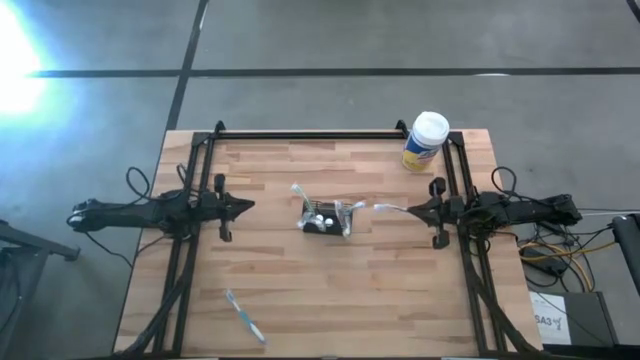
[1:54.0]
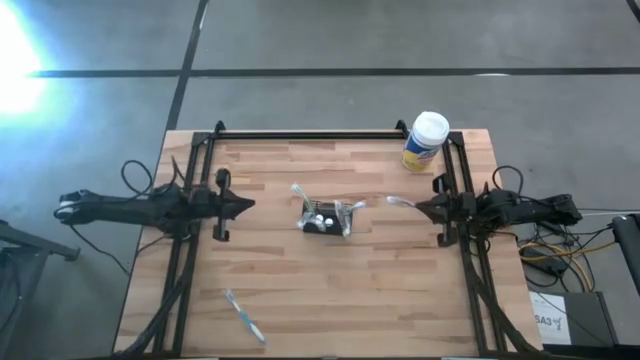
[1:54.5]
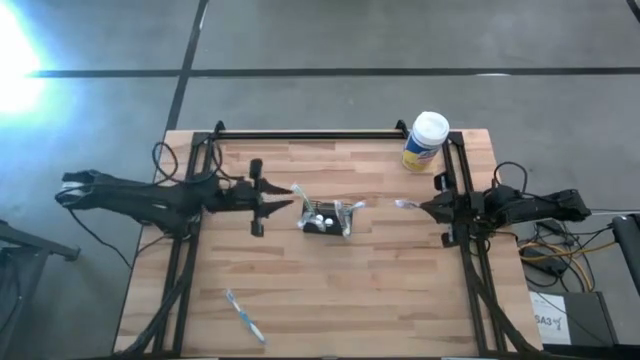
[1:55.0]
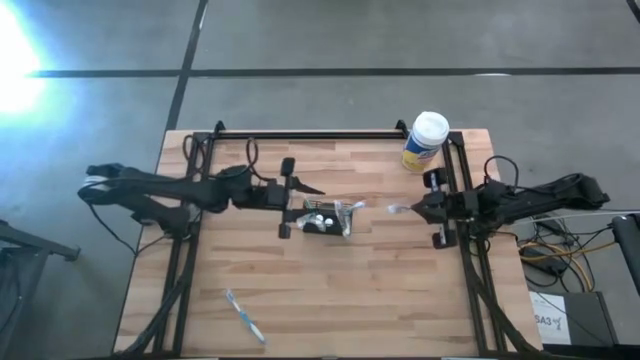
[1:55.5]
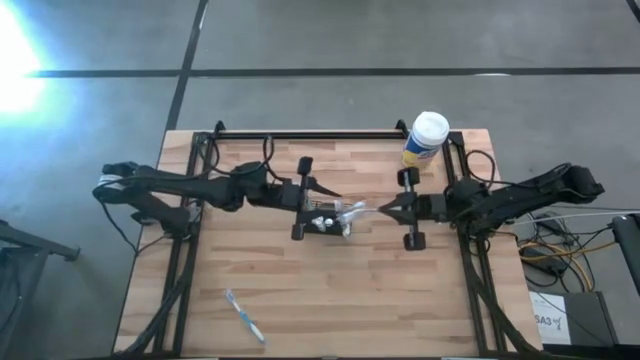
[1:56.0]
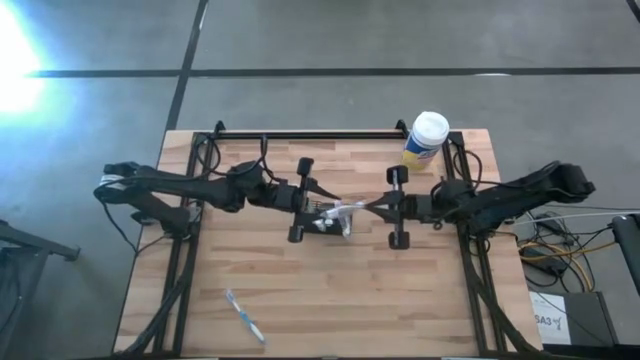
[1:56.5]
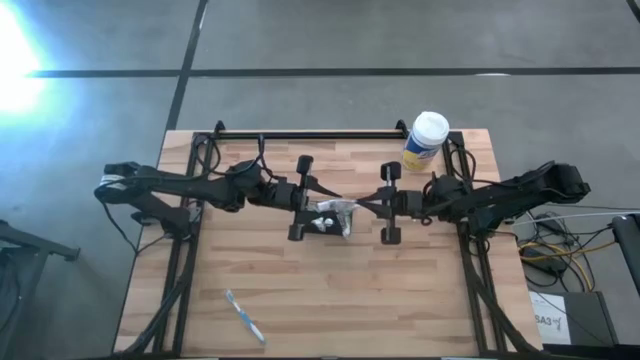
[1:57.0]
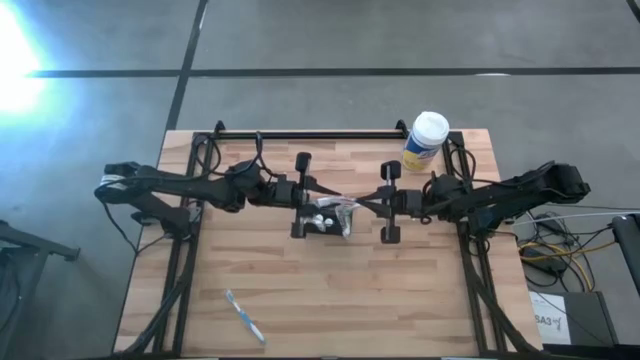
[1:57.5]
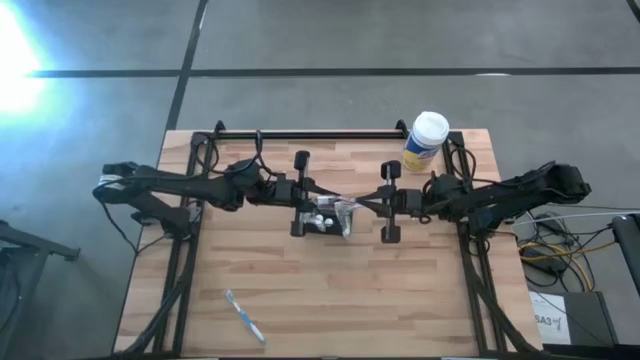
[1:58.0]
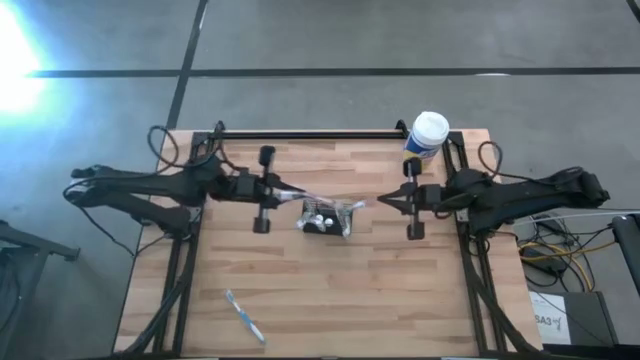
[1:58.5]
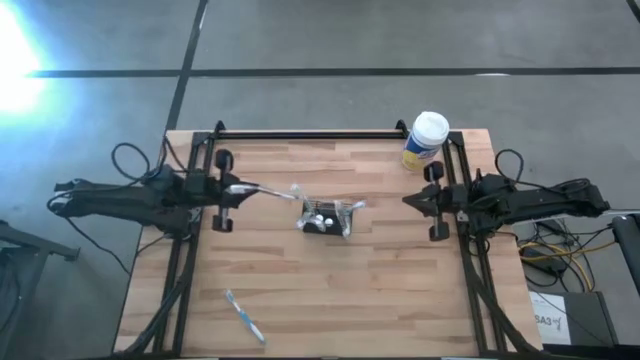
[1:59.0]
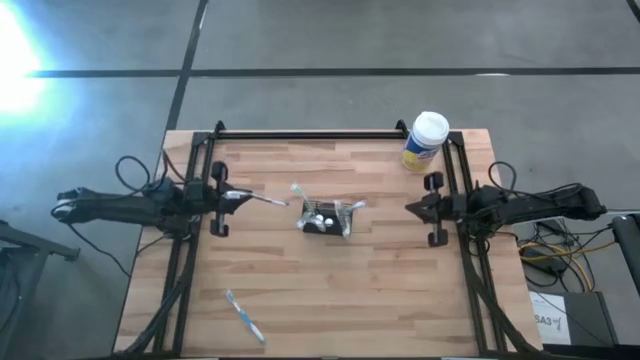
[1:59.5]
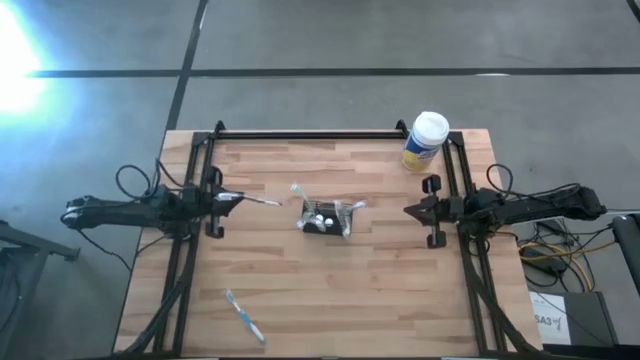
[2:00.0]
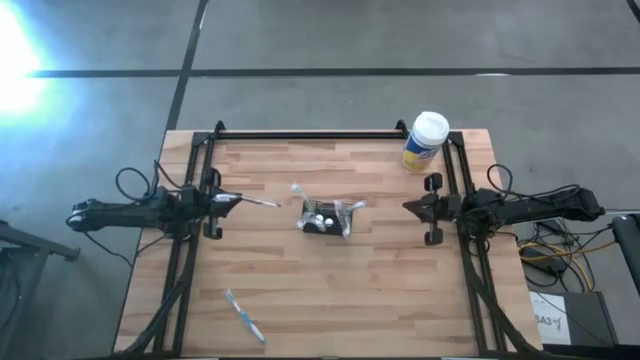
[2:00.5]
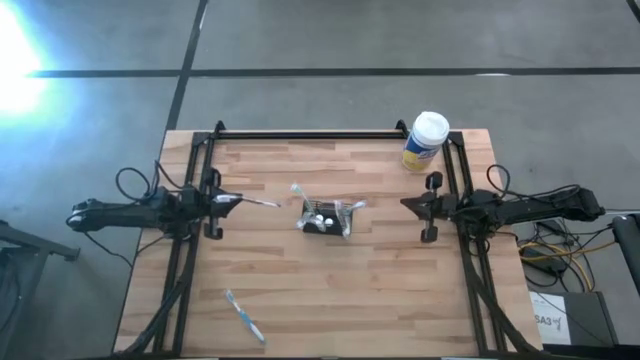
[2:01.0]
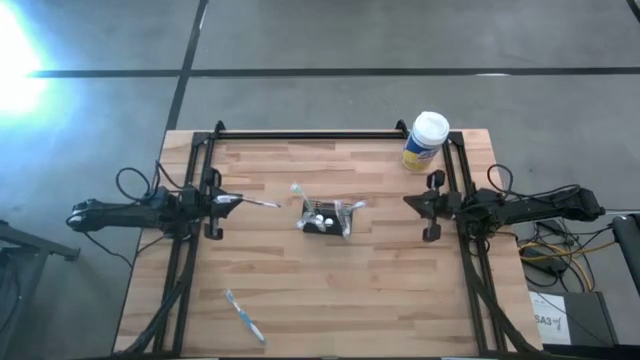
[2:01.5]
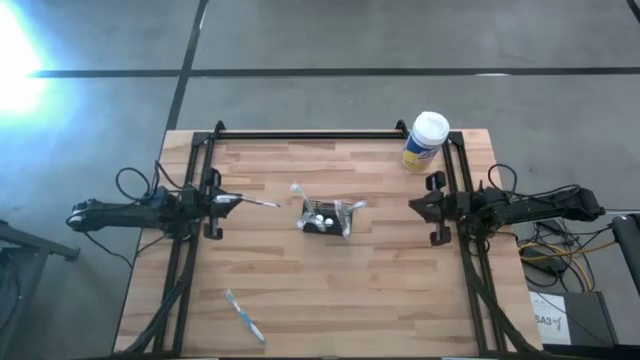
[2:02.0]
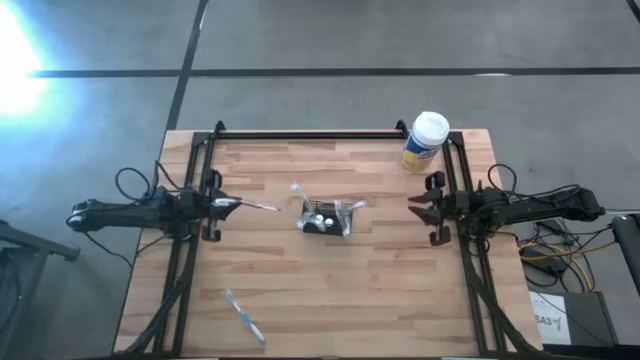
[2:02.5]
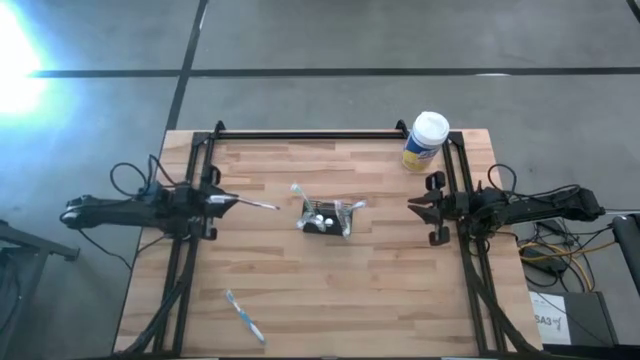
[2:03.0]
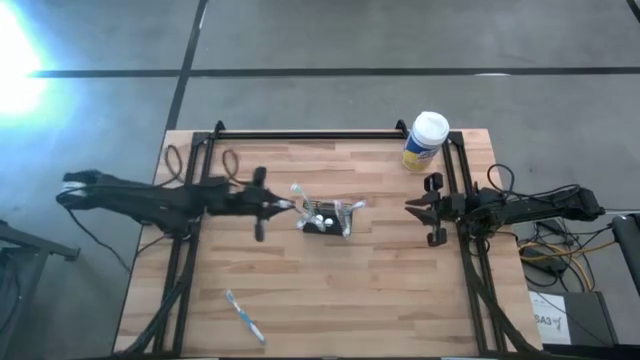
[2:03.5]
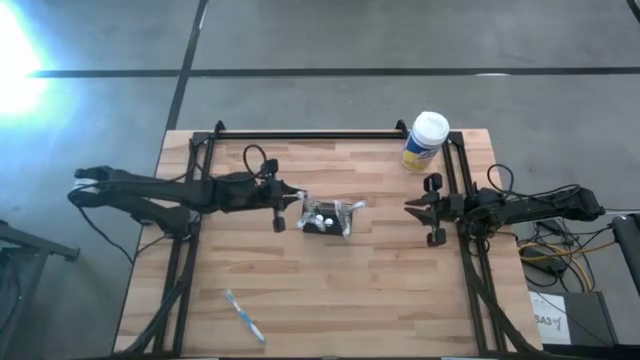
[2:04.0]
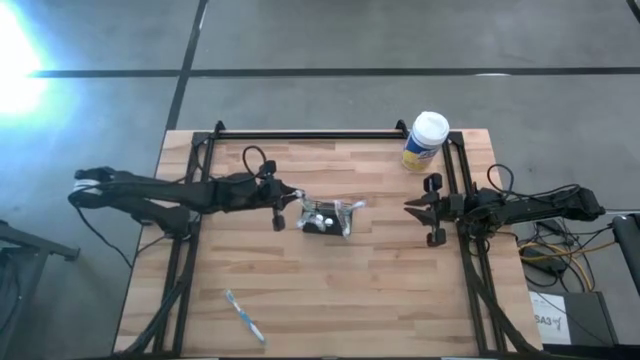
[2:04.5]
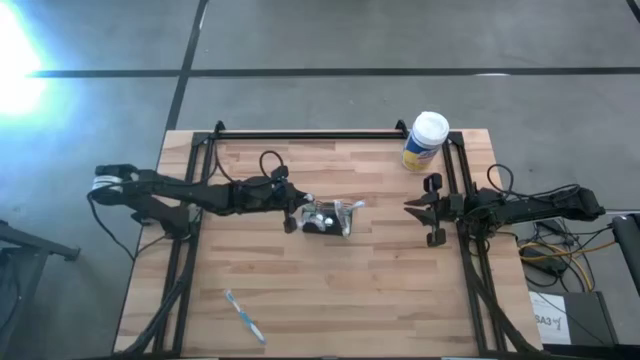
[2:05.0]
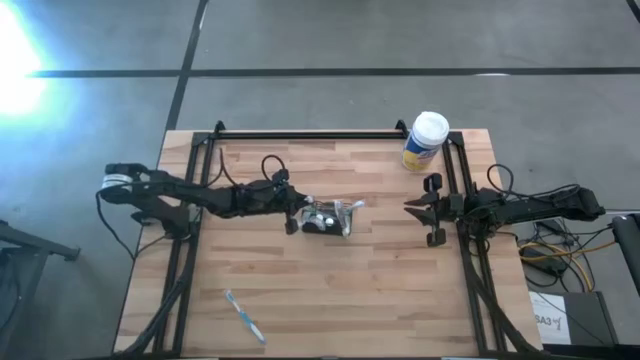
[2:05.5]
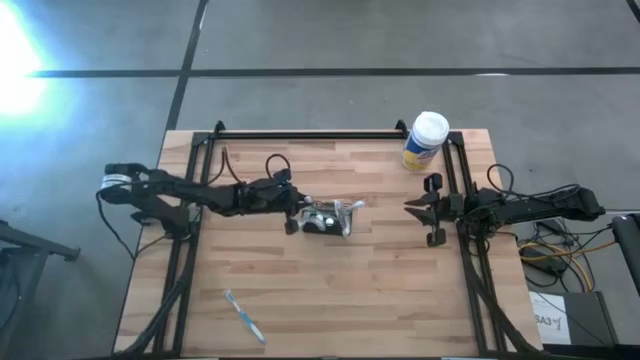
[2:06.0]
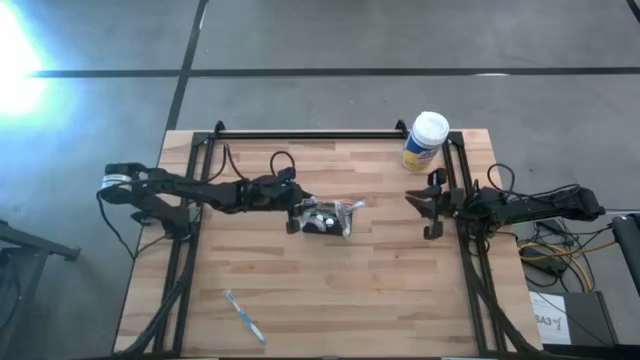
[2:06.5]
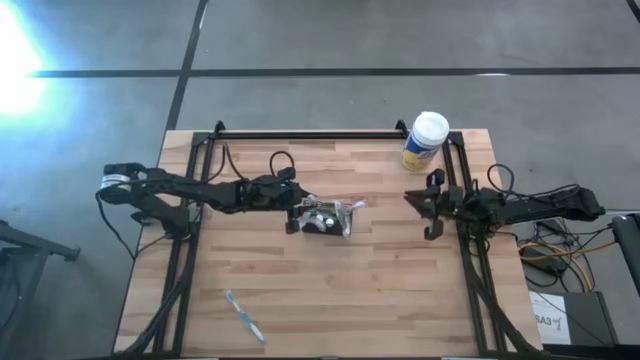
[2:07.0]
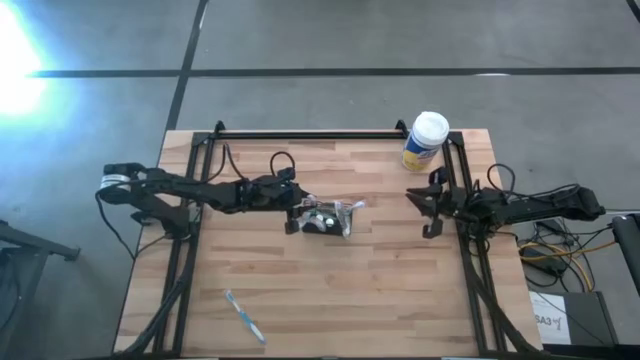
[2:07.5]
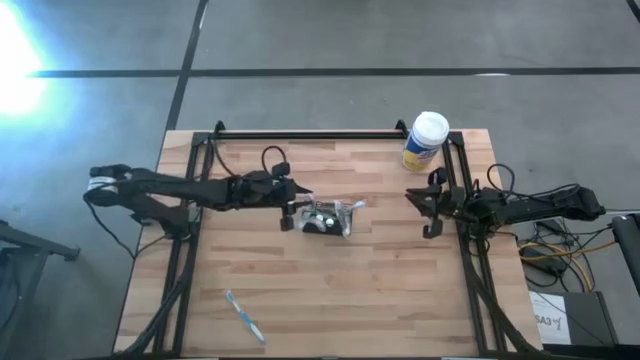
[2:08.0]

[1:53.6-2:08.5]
Task: Pick & Place toothbrushing station
Put the violet toothbrush into the black mesh organizer

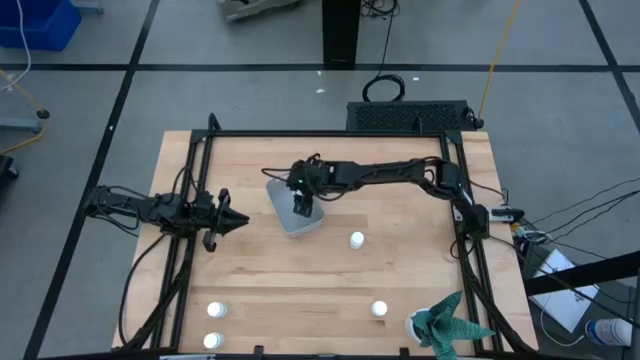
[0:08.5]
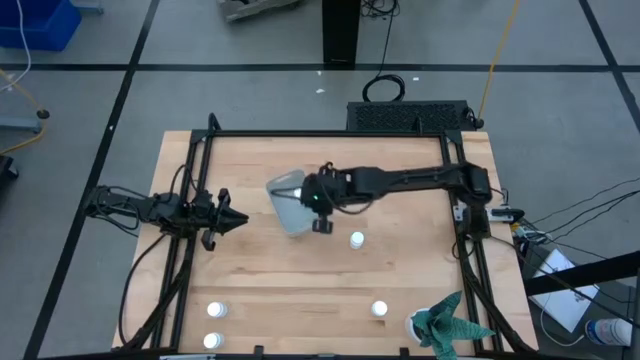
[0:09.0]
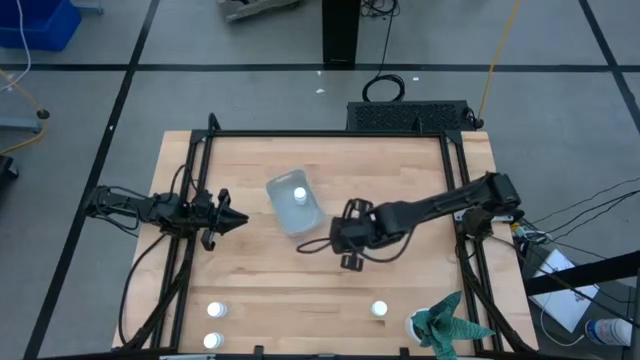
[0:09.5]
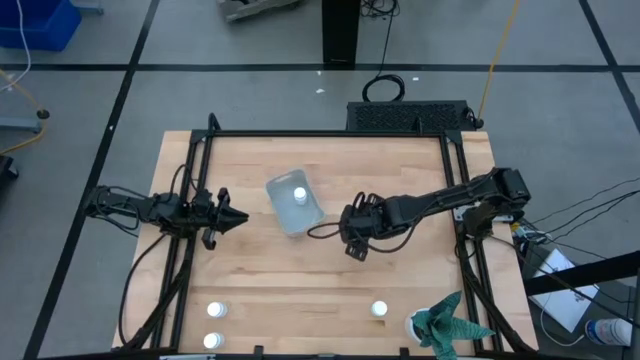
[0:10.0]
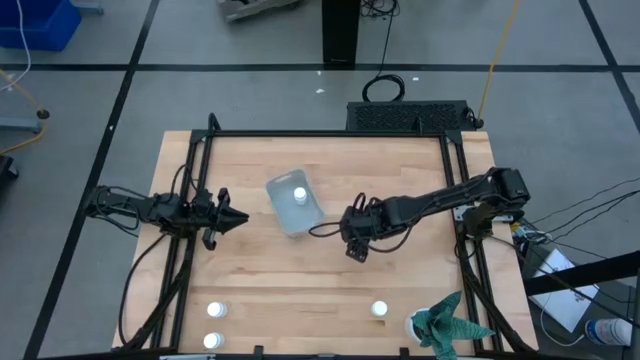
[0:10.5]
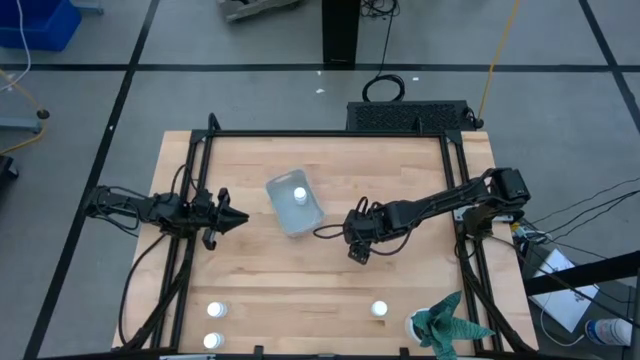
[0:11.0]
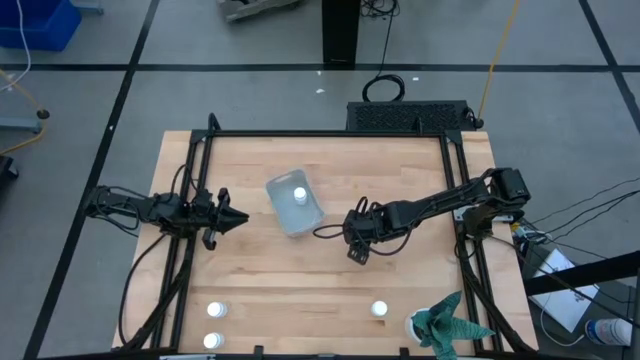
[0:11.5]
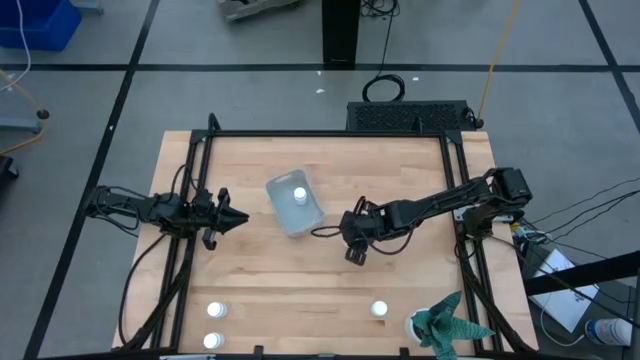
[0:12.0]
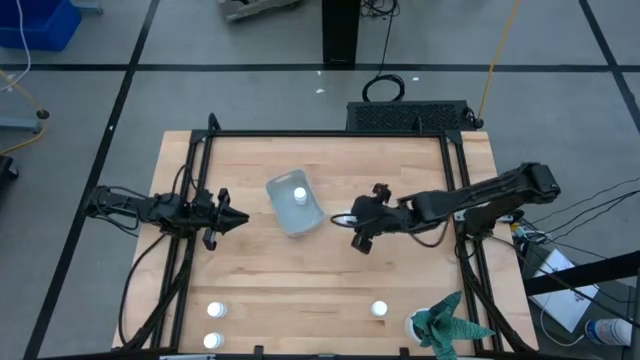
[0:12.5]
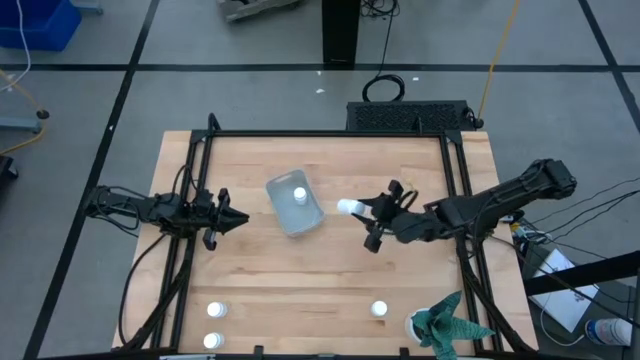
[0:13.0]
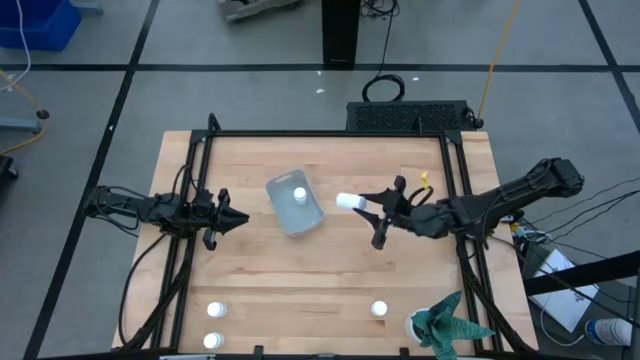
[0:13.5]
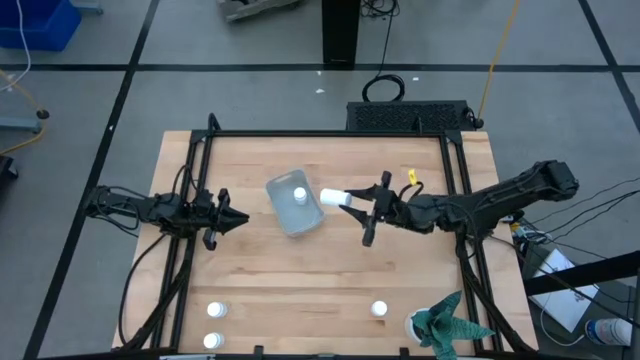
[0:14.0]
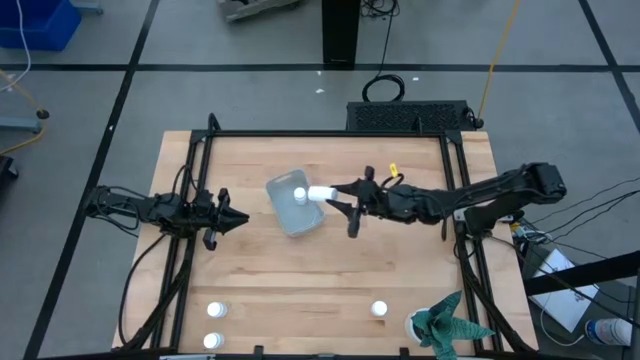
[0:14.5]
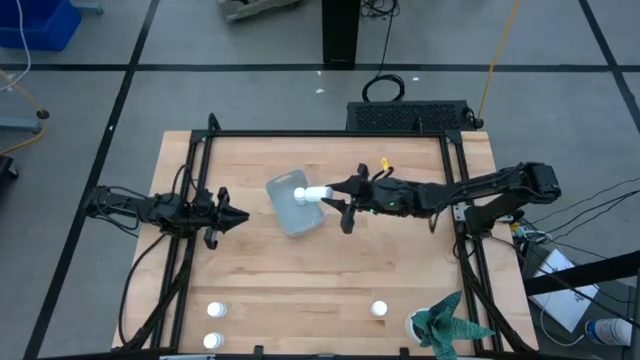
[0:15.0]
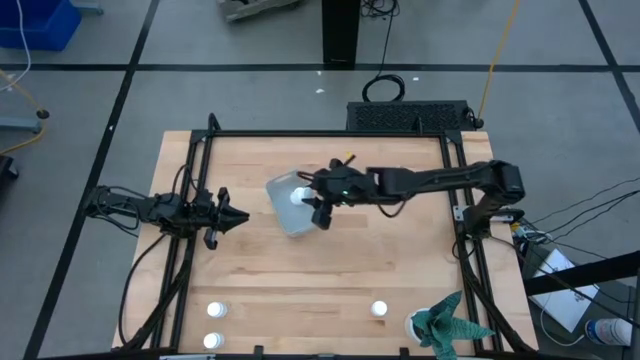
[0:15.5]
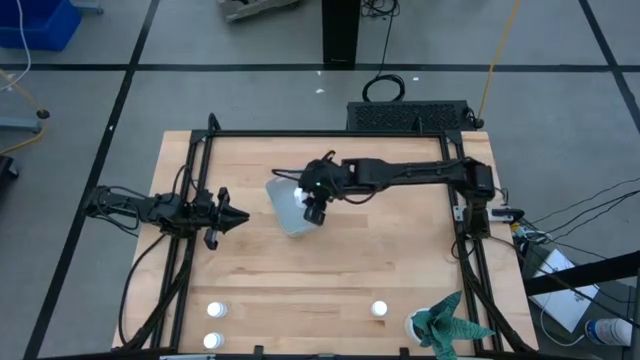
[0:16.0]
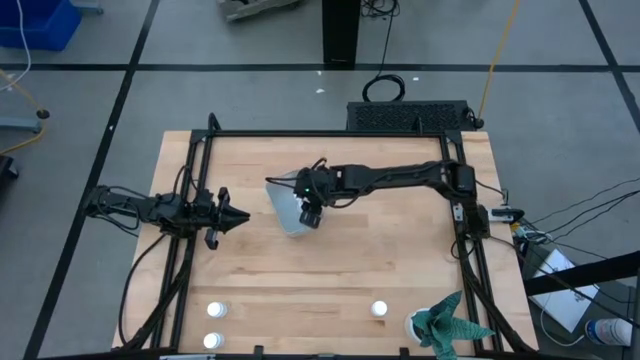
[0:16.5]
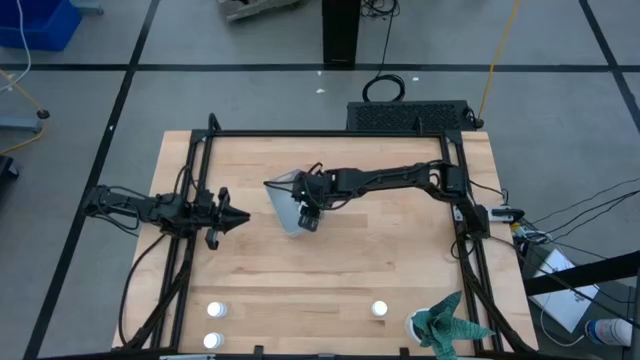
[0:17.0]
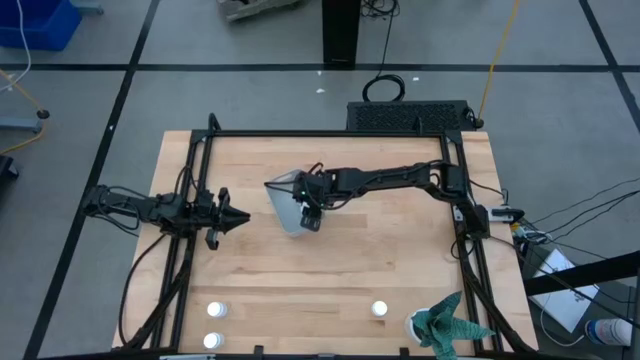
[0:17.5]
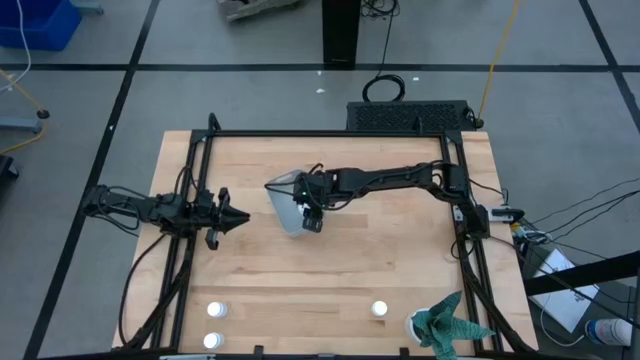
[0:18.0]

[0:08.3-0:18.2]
Task: Pick and place pill bottles into a basket
Put the white pill bottle into the gray bin
